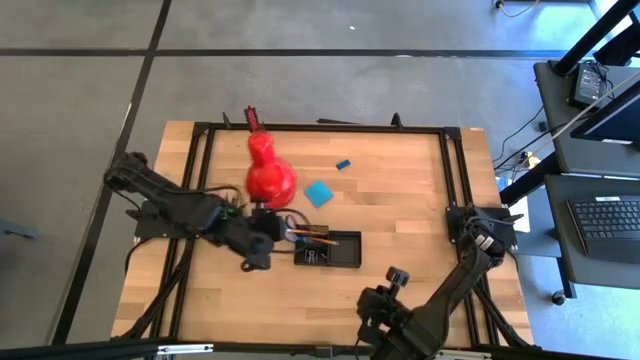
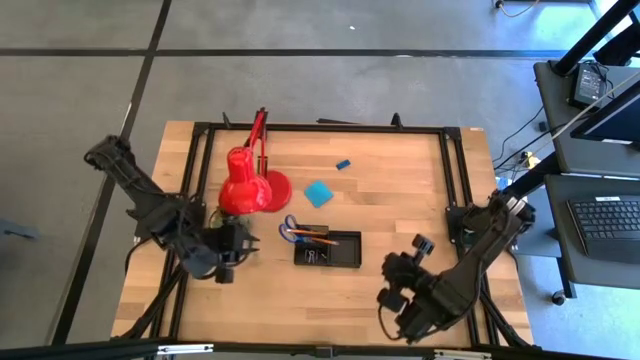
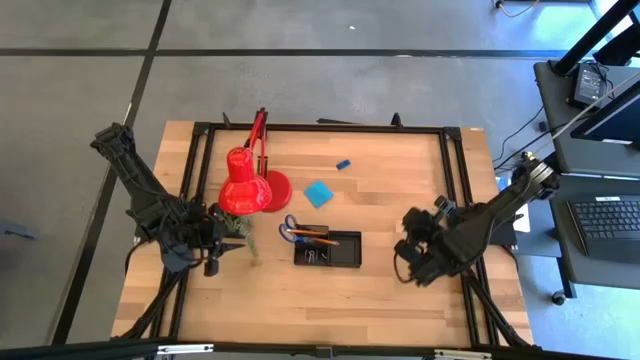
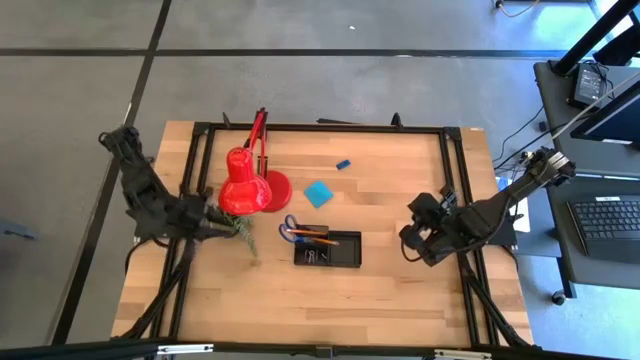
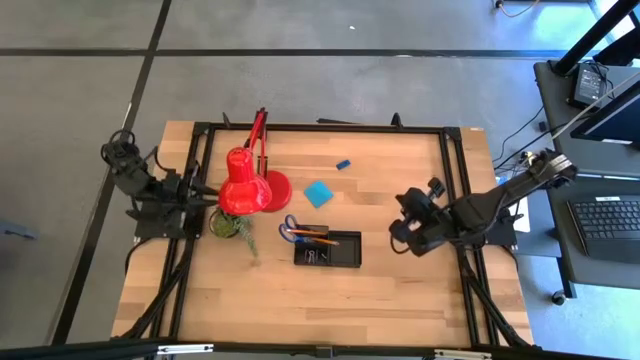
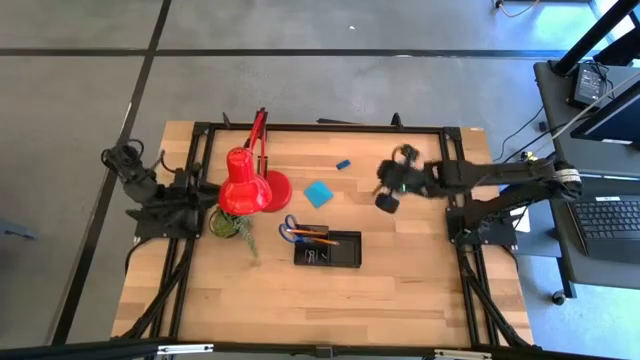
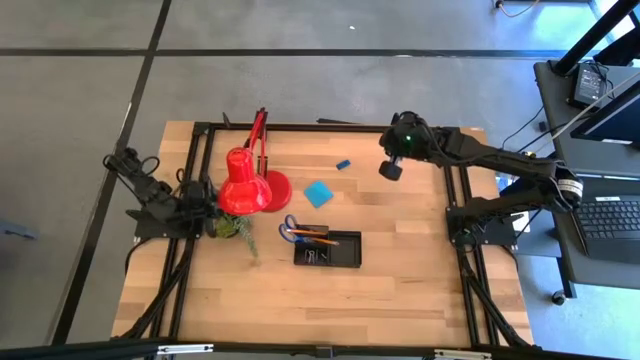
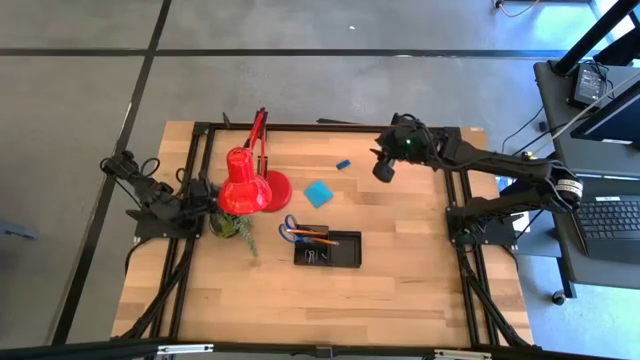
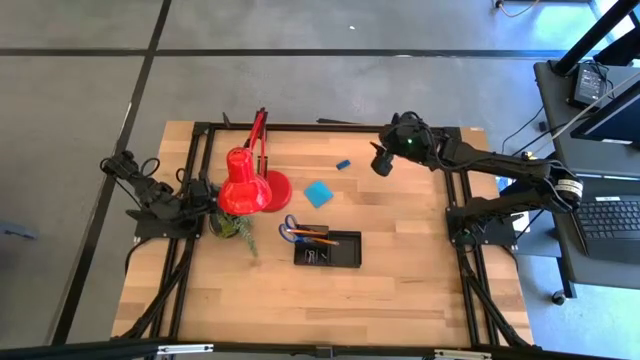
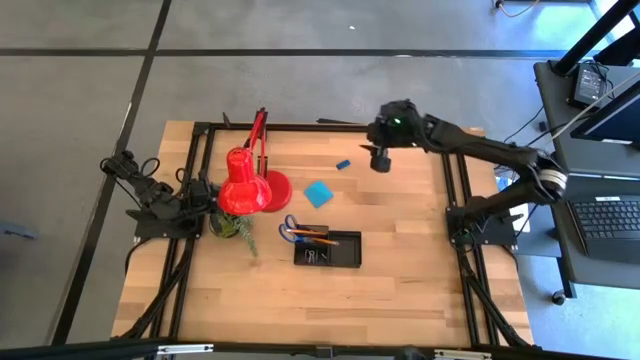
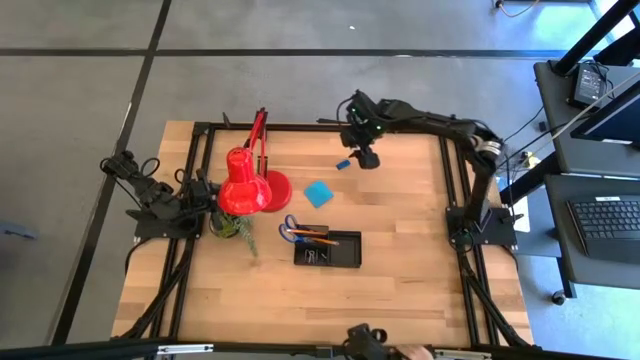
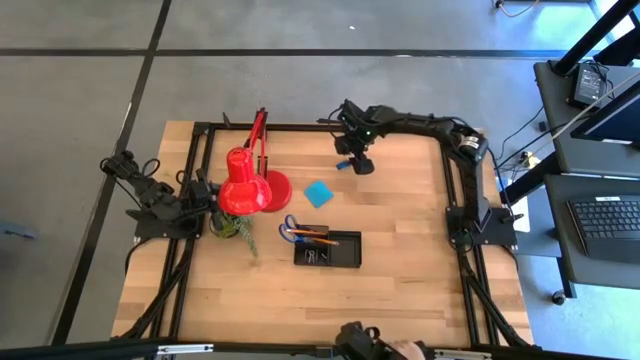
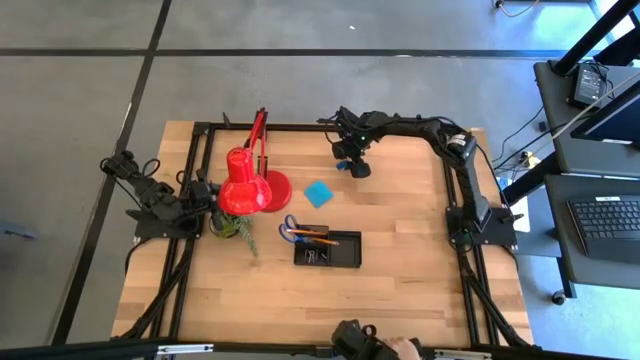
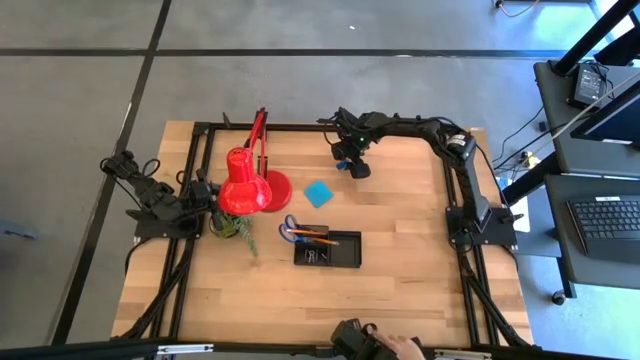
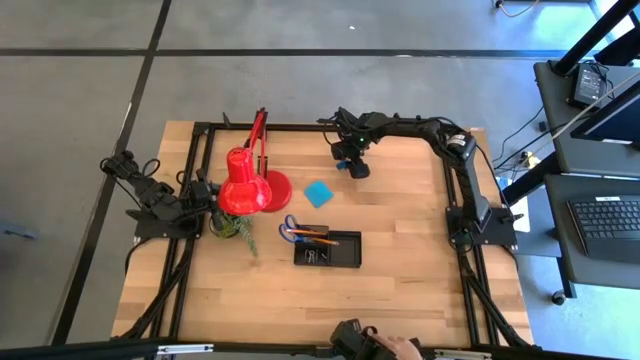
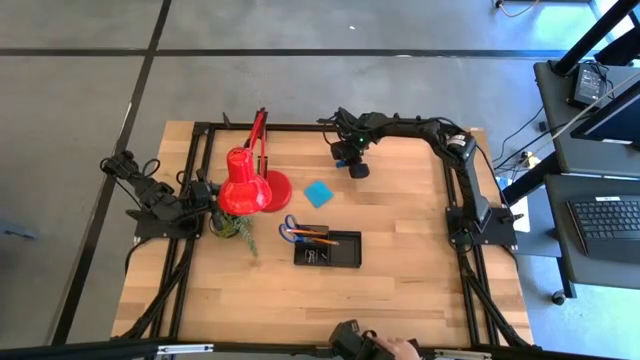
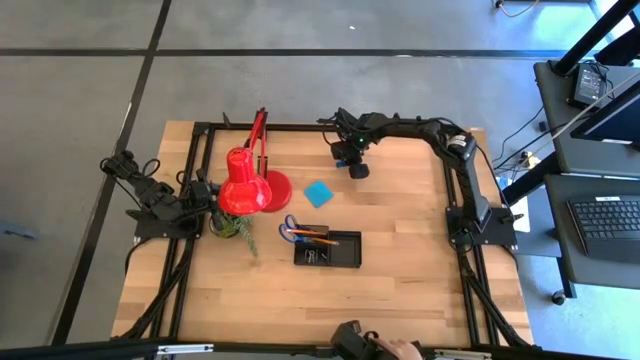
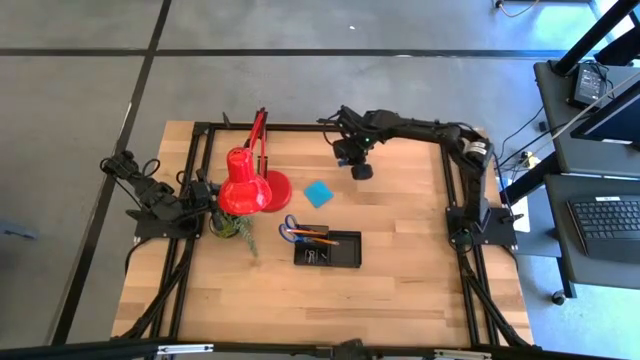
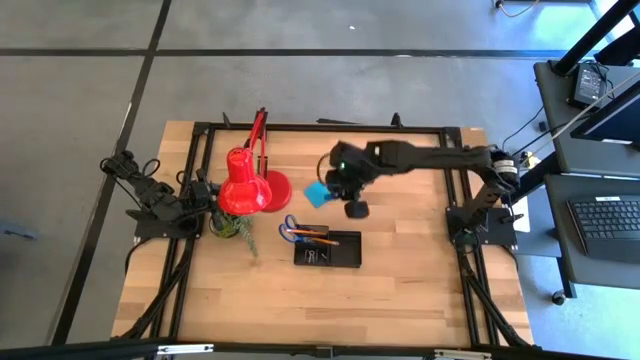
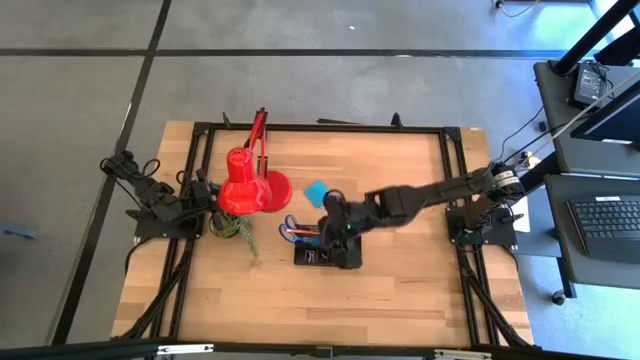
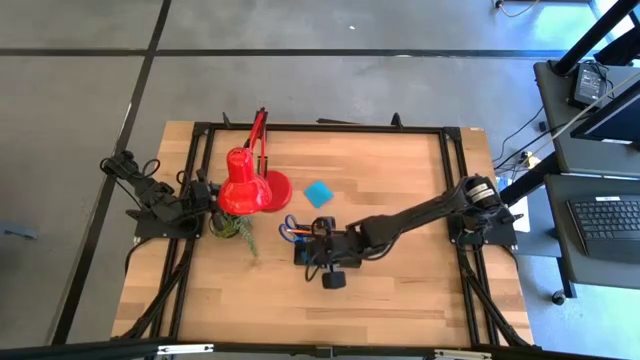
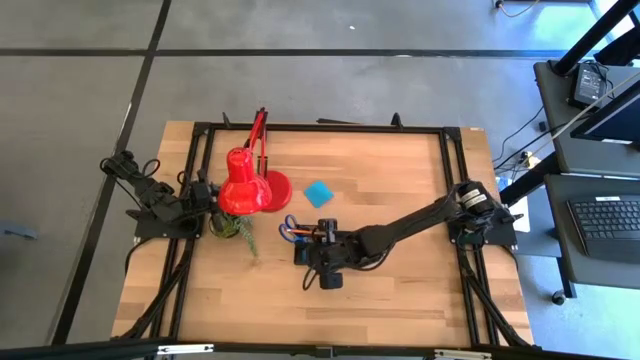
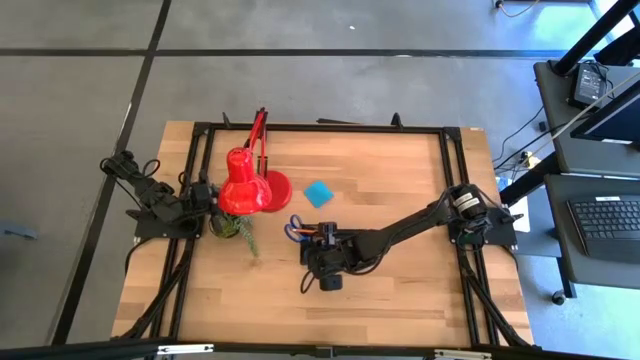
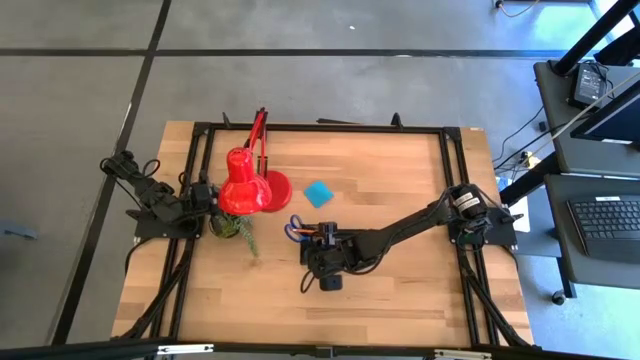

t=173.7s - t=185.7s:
Task: Pick and place office supplies into organizer
Put the blue eraser into the desk organizer

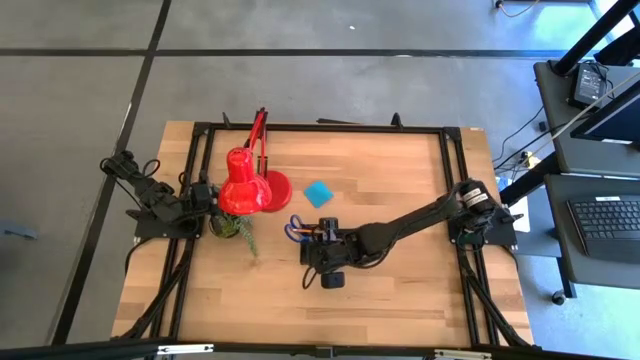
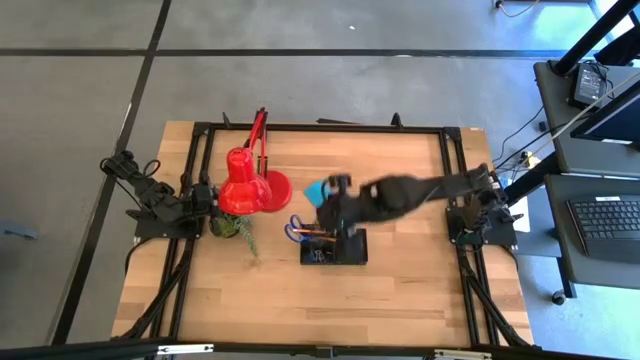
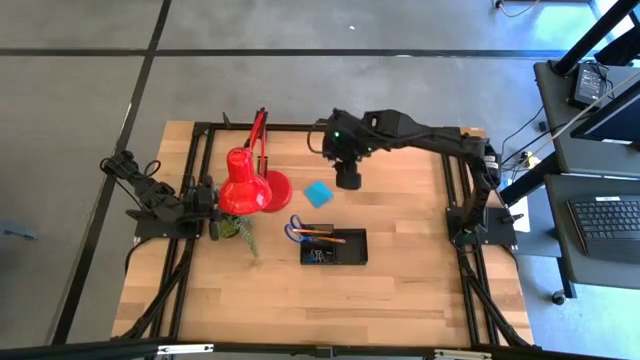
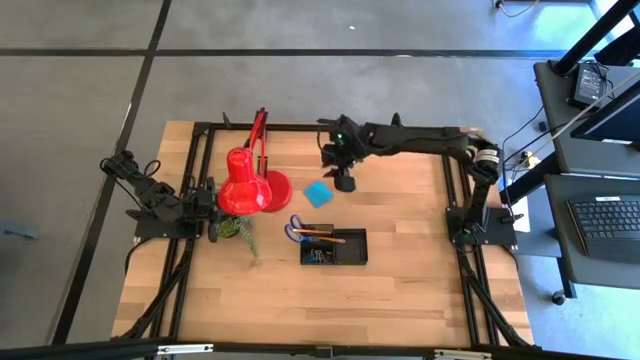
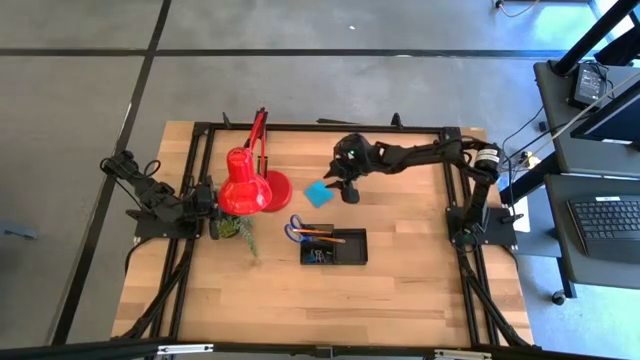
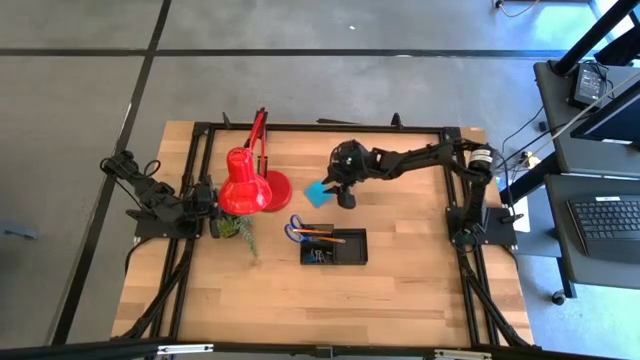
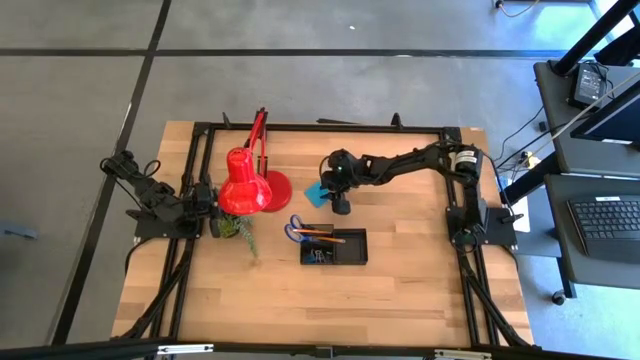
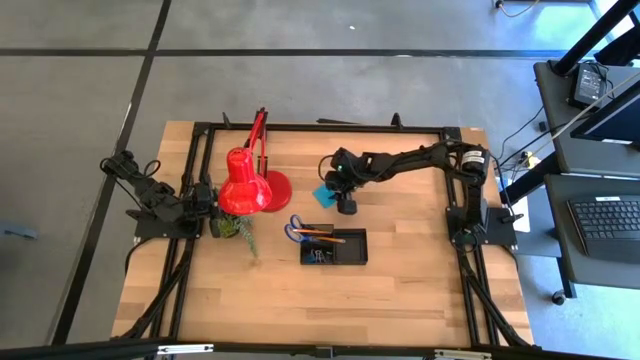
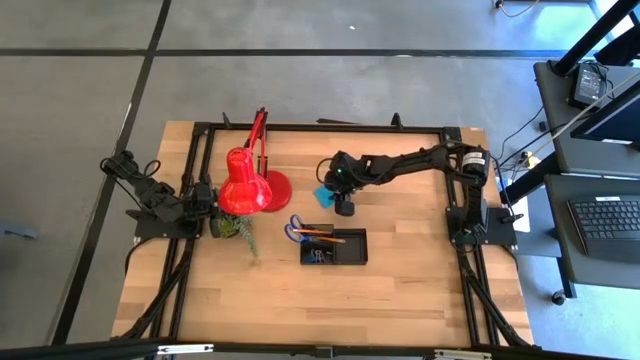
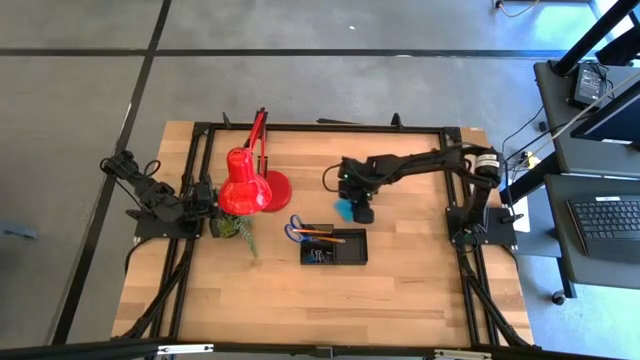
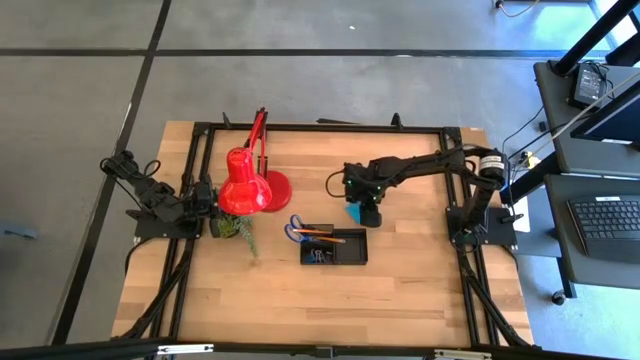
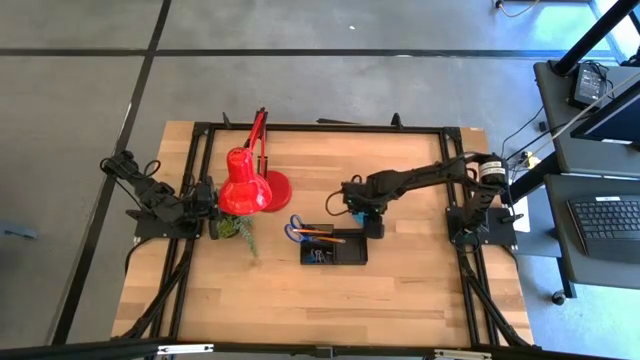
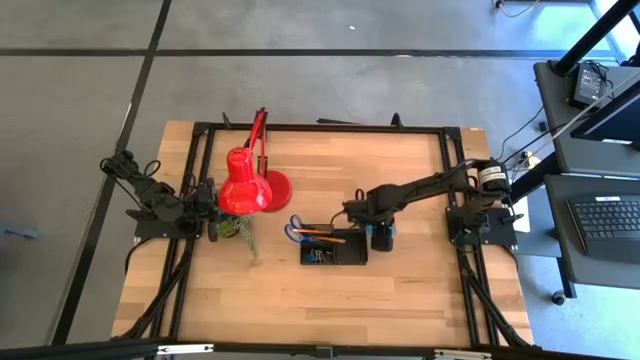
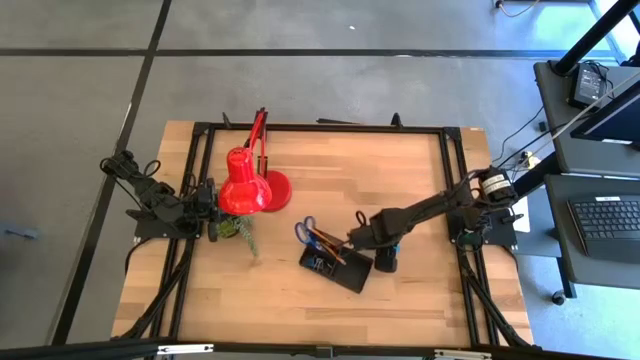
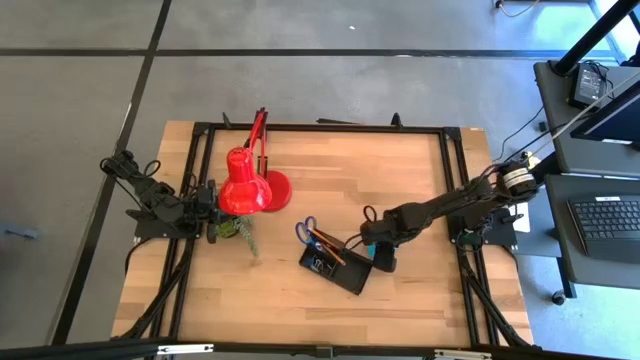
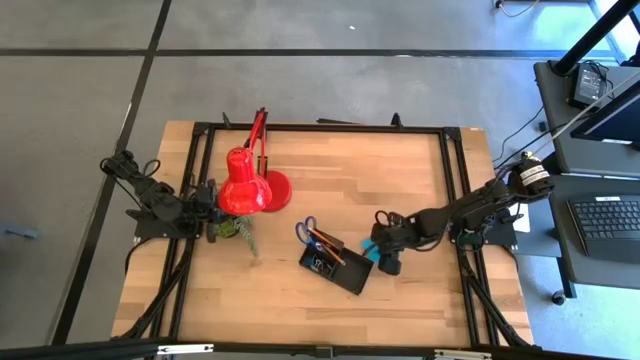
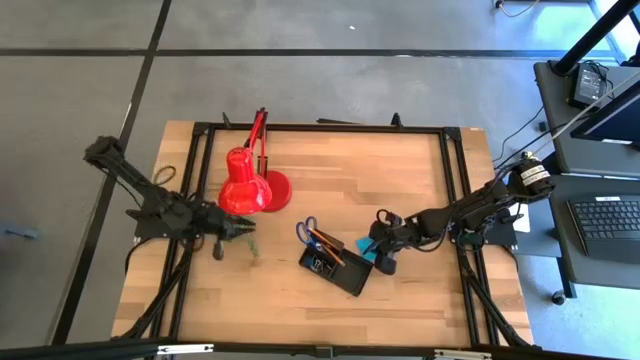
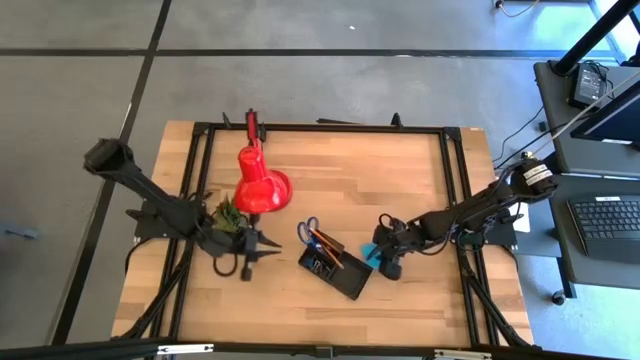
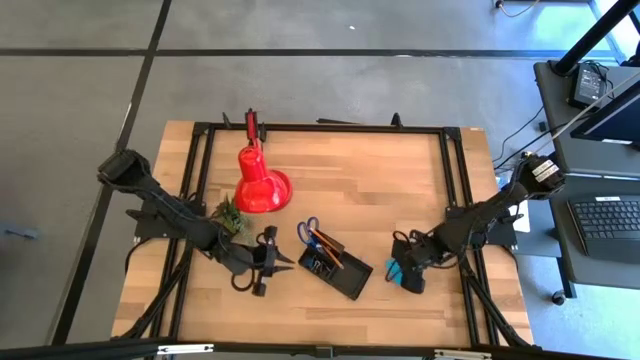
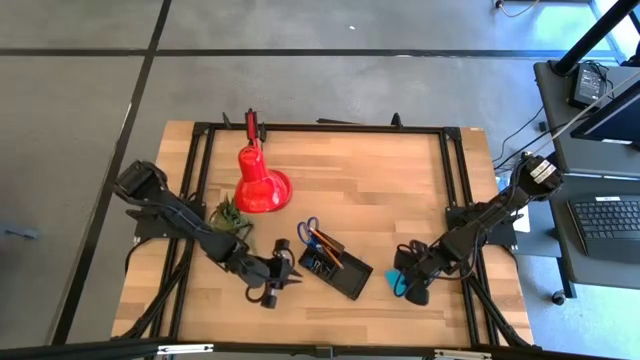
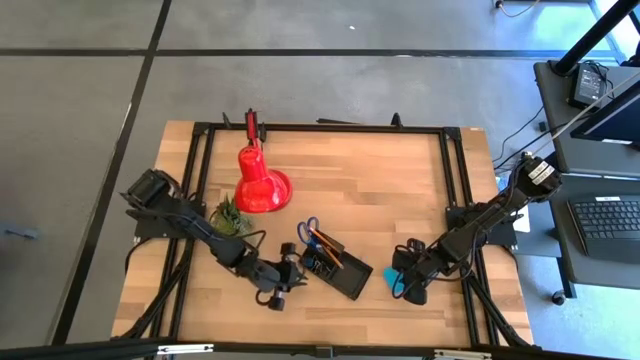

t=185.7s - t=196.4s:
Move the sticky note to the bottom right of the table
